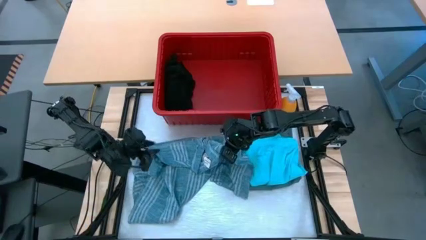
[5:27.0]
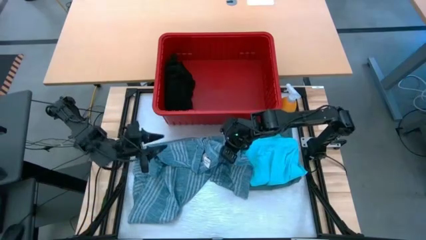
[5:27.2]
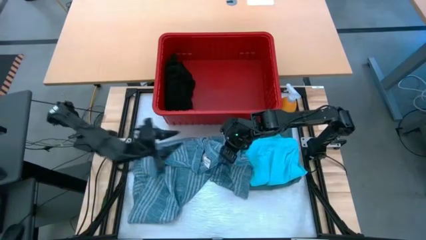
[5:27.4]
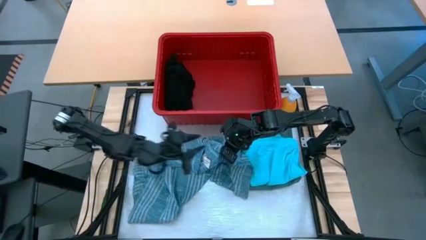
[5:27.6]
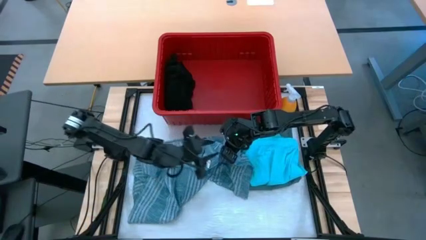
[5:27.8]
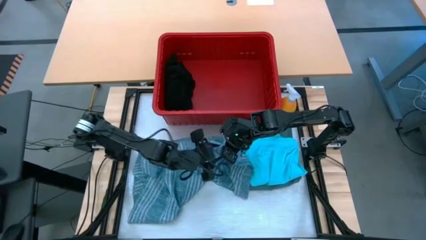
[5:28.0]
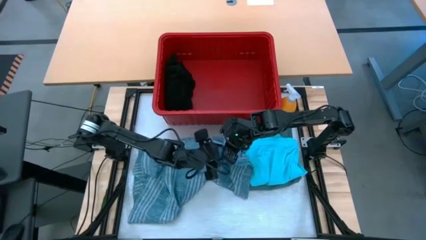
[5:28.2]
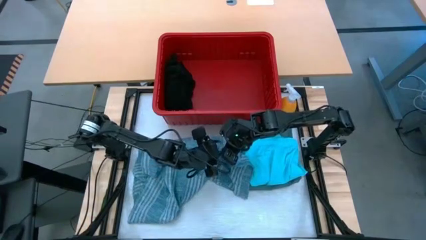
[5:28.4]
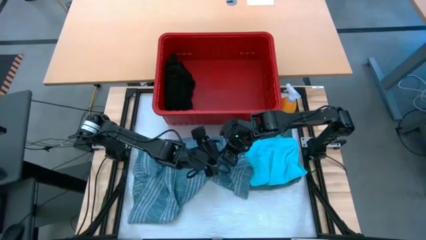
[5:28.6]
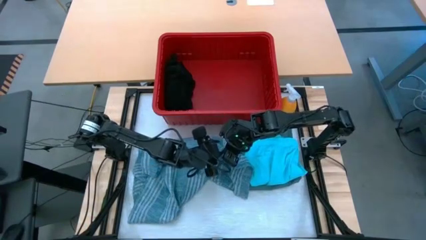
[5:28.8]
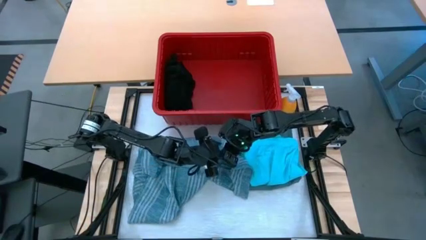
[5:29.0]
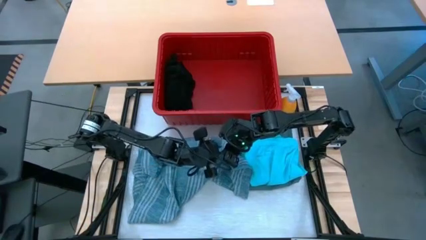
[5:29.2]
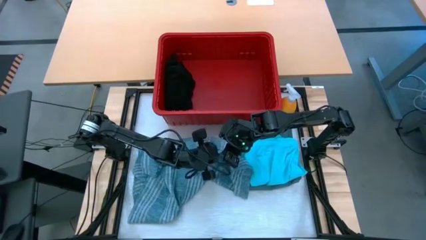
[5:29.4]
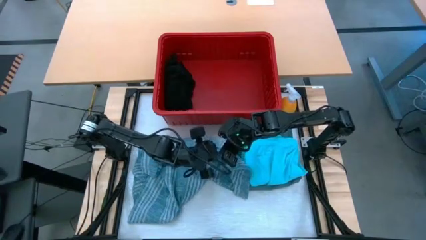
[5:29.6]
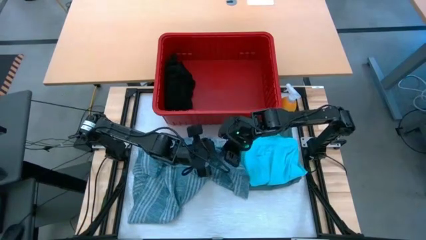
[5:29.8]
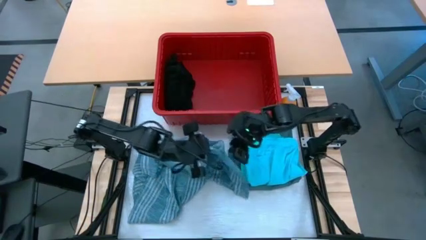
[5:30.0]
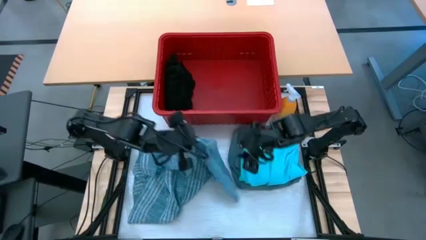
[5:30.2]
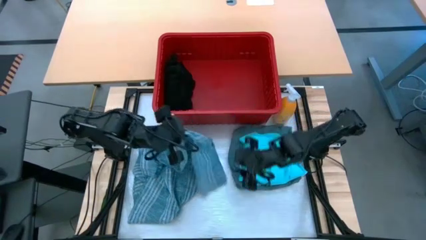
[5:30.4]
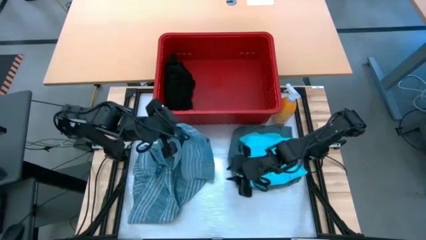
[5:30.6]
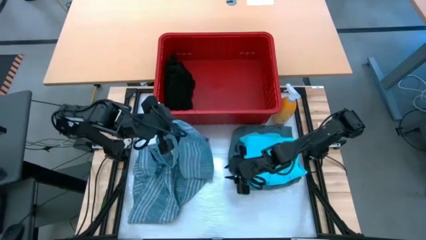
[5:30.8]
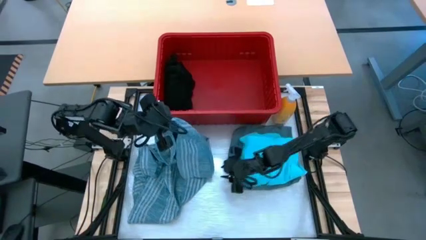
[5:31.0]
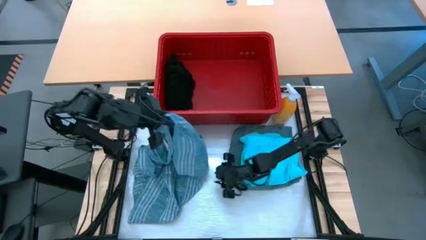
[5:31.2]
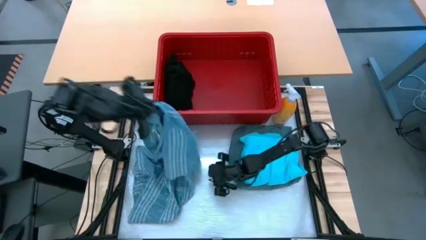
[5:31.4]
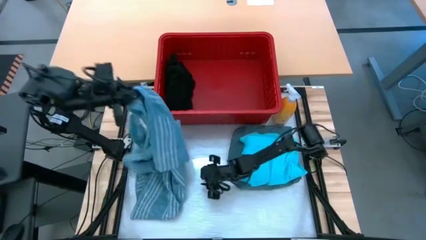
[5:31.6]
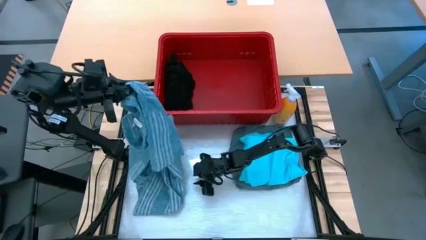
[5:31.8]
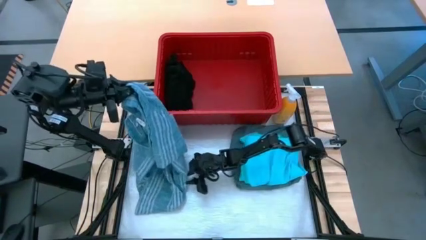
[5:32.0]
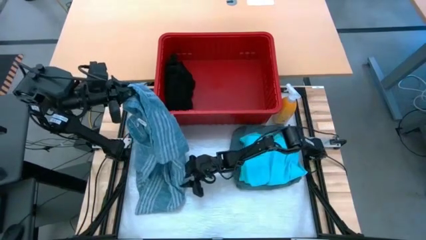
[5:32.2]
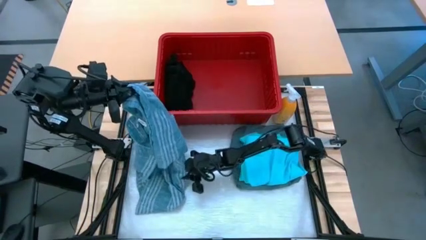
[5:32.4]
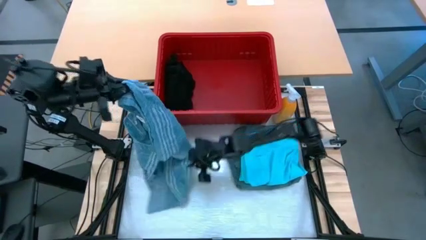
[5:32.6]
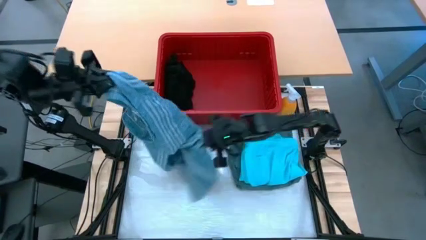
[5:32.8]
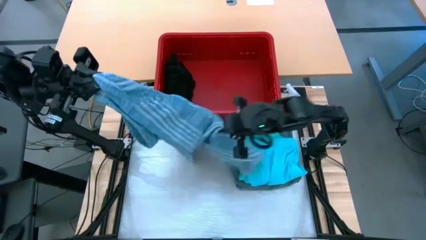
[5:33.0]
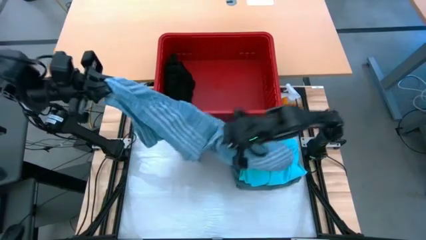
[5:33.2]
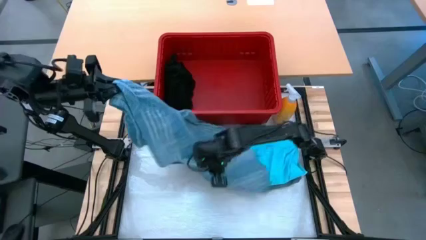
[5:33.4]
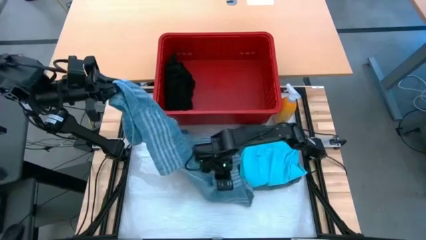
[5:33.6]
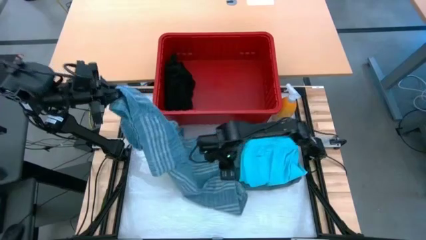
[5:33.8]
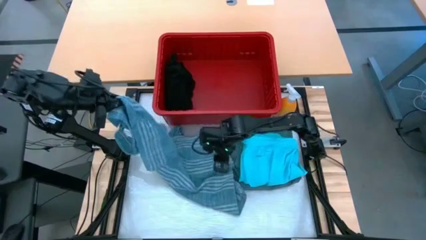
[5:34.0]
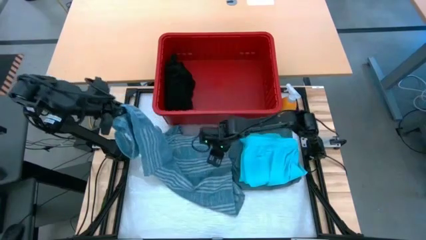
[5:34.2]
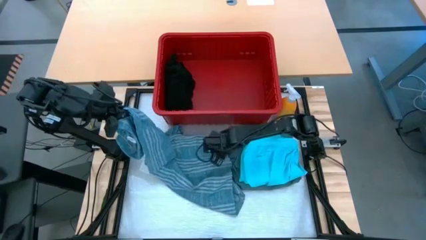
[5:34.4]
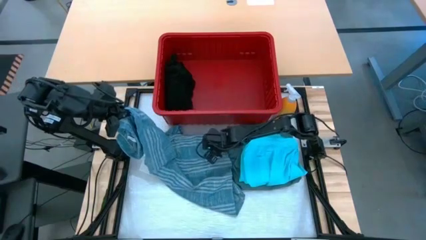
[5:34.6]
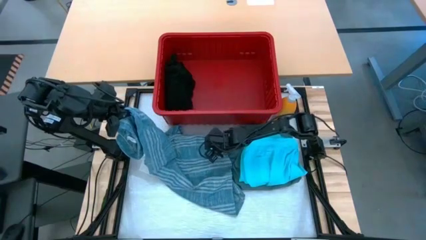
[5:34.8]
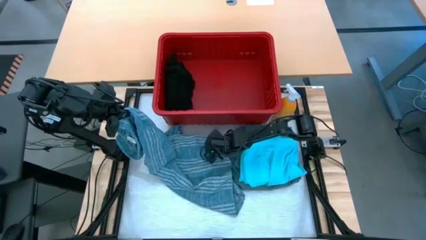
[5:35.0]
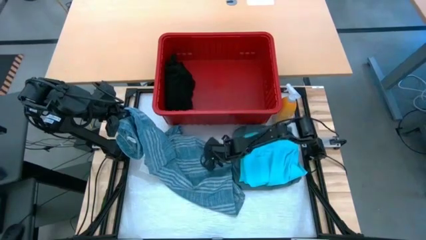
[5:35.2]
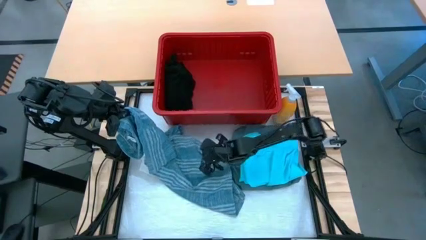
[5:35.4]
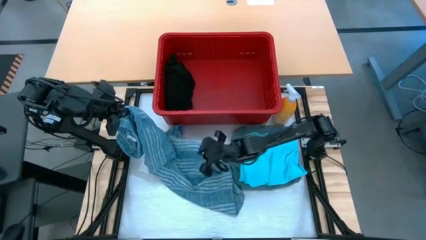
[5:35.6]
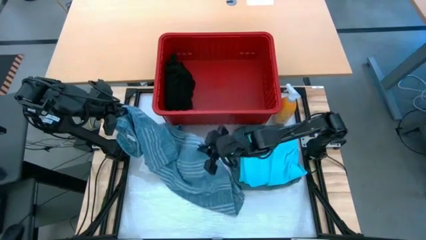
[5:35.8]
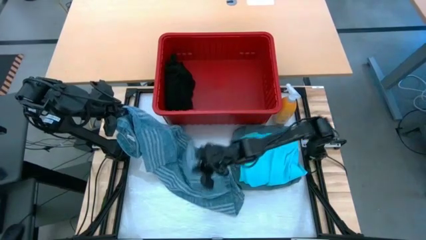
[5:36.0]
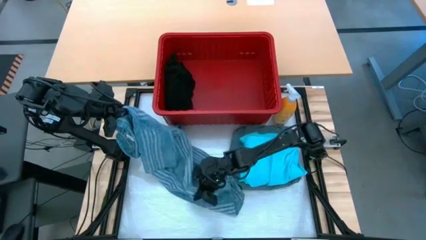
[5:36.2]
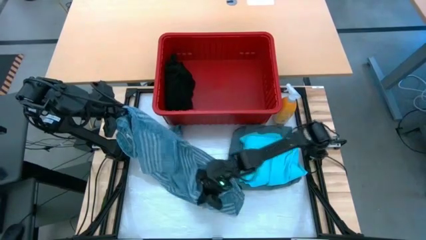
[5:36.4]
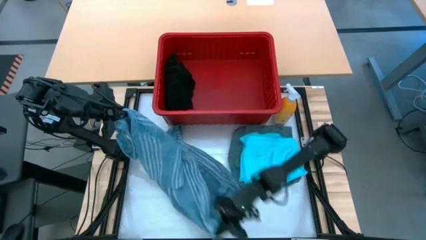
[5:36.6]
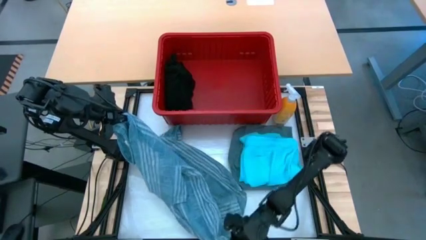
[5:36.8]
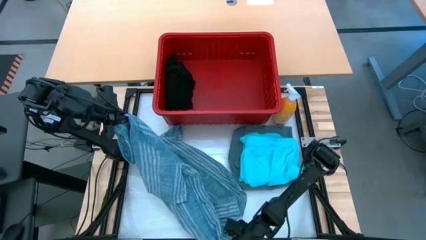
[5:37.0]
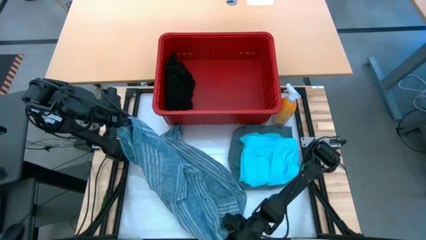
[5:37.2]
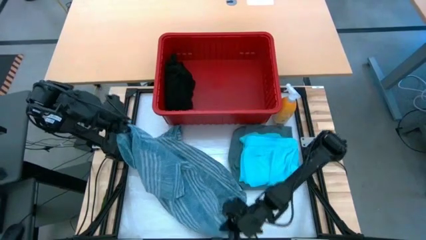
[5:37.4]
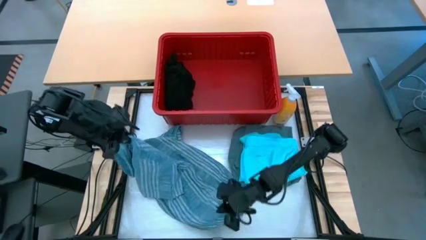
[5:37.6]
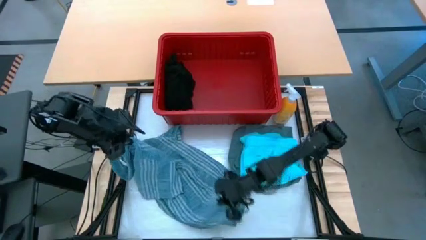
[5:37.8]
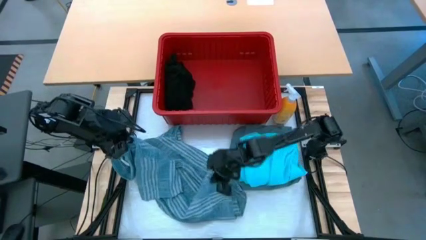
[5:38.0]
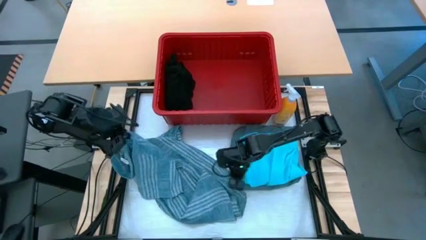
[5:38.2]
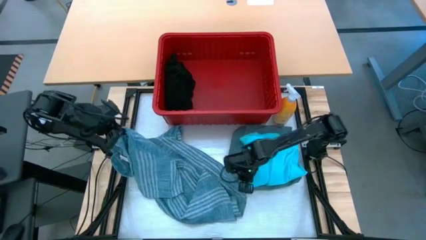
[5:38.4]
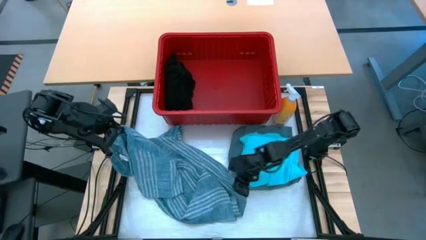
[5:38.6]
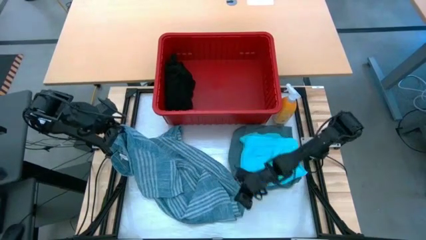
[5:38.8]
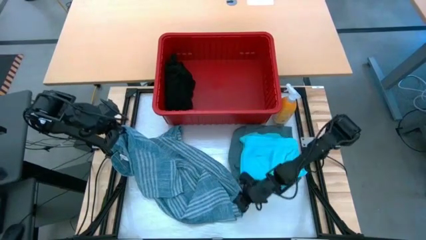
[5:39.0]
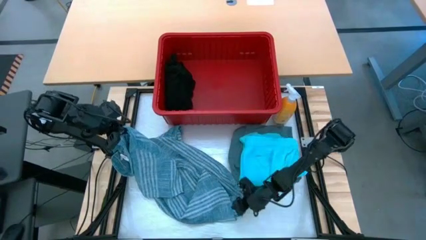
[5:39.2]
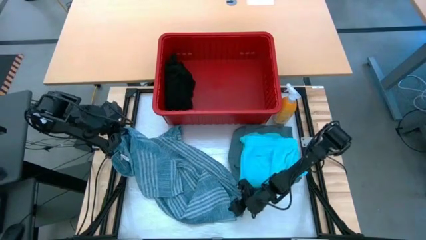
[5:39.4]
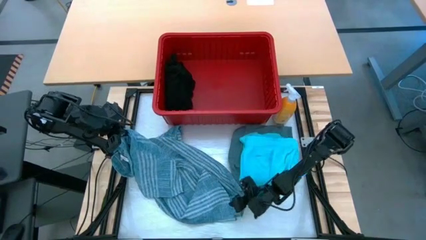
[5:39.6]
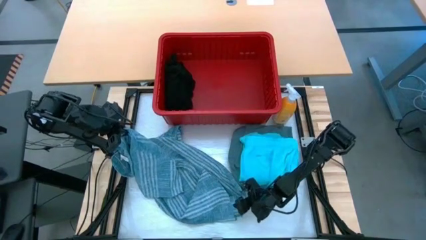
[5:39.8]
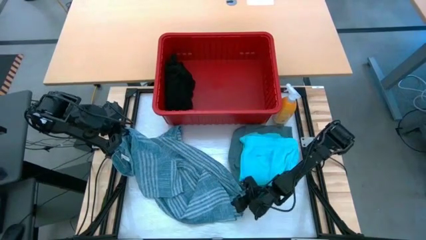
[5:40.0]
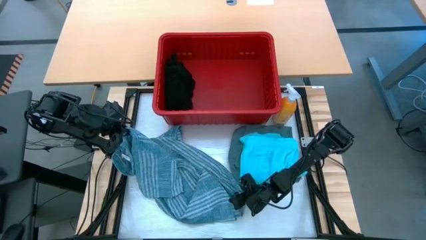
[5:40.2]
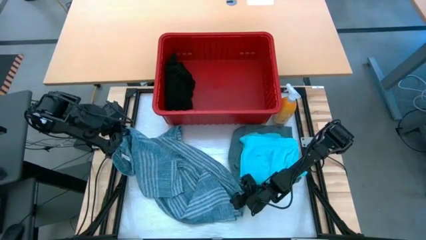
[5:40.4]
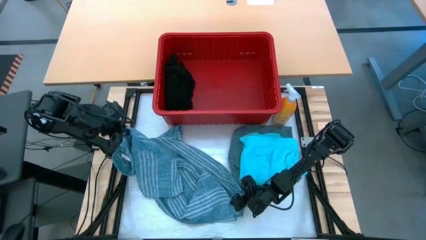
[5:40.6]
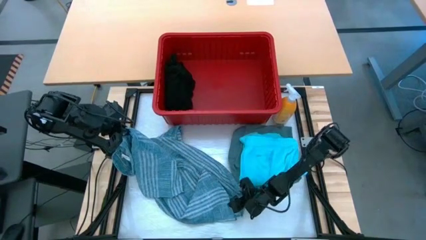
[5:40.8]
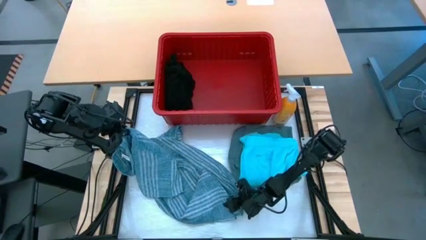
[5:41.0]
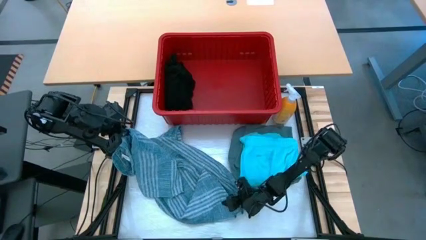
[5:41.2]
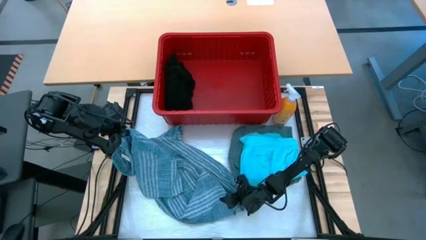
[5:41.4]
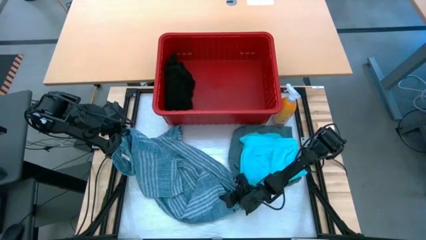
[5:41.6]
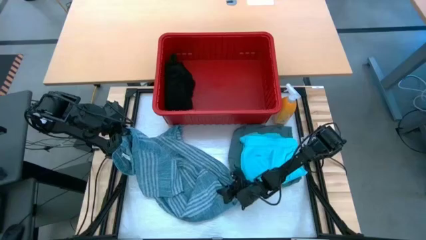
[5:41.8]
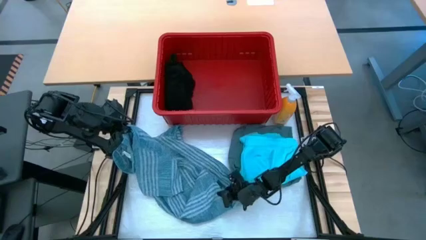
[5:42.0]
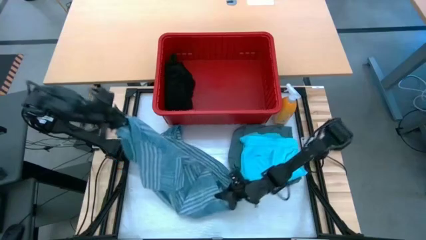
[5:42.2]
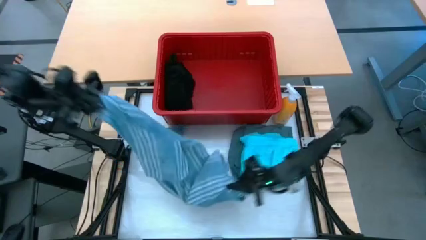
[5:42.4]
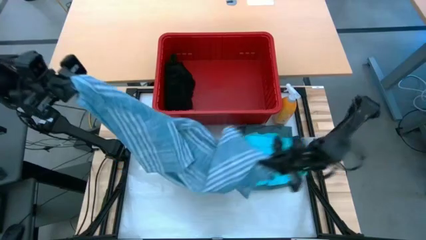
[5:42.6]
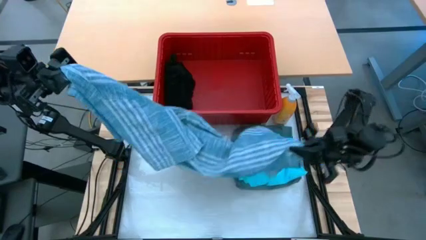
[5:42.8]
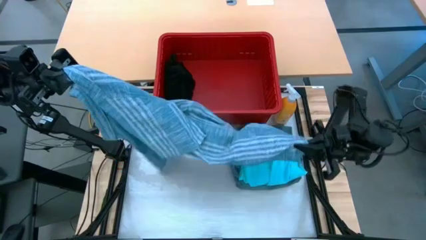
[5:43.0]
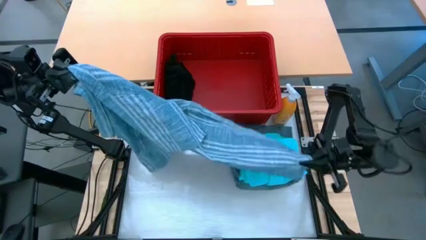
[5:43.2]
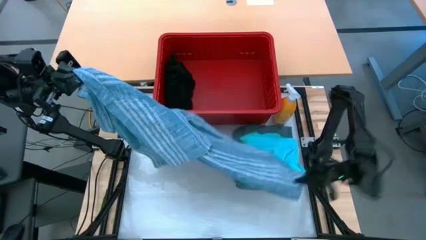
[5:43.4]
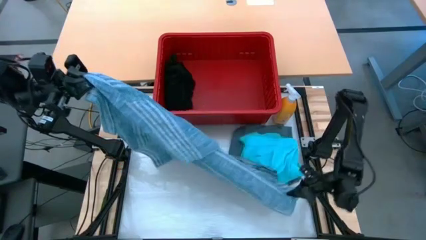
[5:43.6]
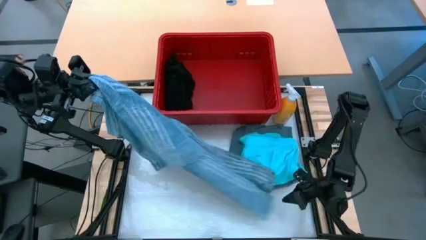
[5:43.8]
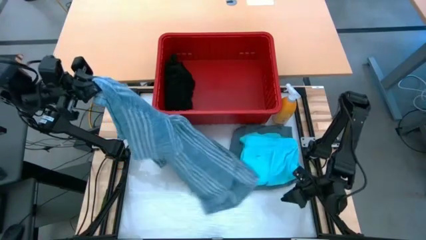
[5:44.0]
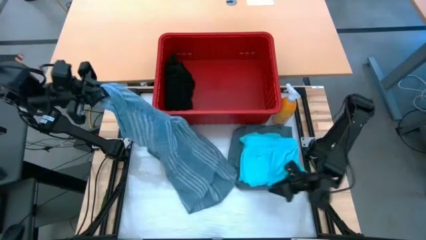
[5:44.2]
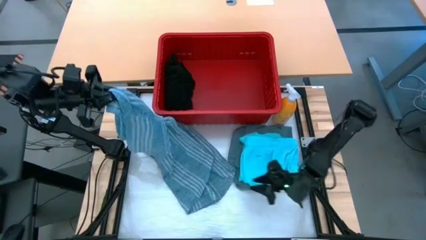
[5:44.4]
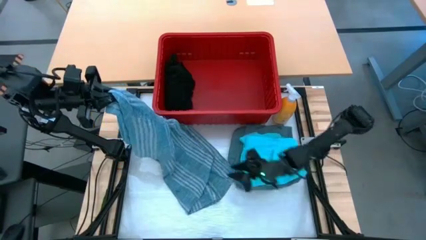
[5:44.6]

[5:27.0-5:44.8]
Task: Fold Laundry from Bin
Fold the blue shirt
